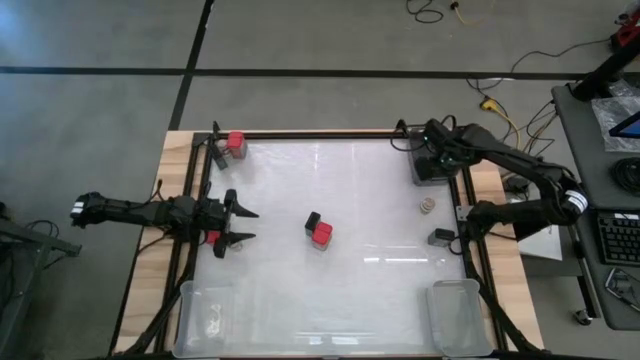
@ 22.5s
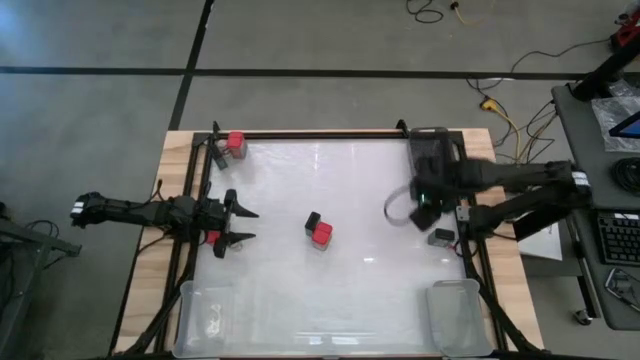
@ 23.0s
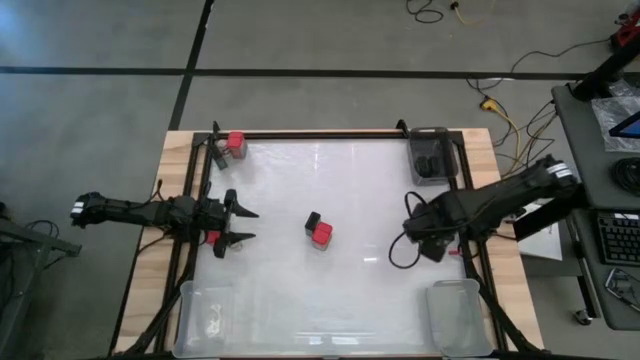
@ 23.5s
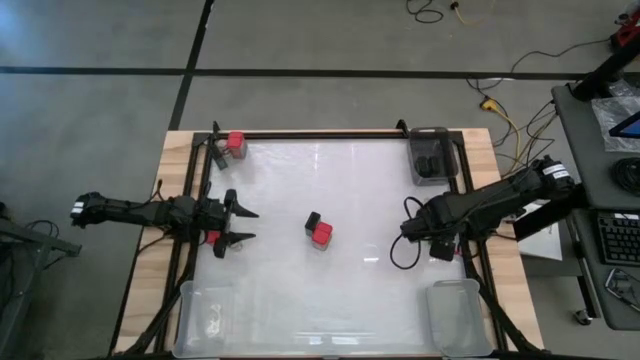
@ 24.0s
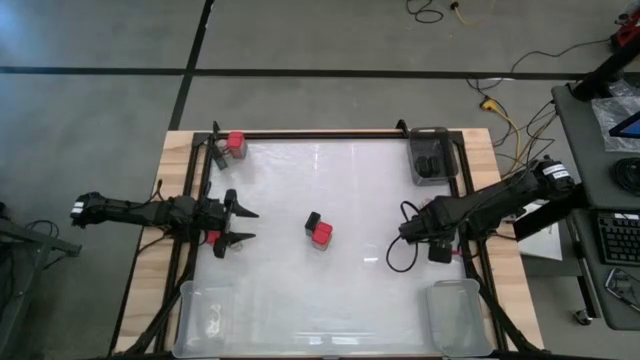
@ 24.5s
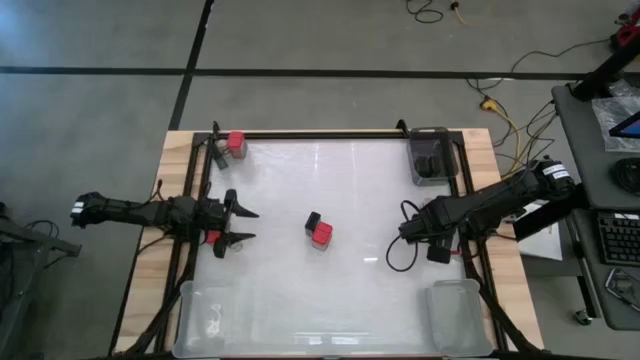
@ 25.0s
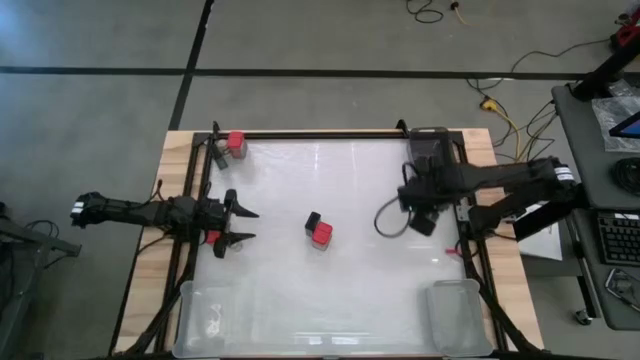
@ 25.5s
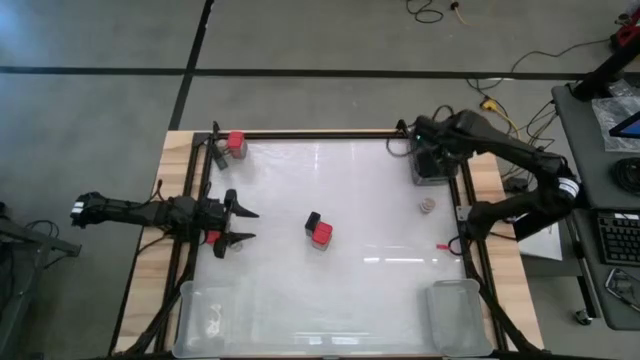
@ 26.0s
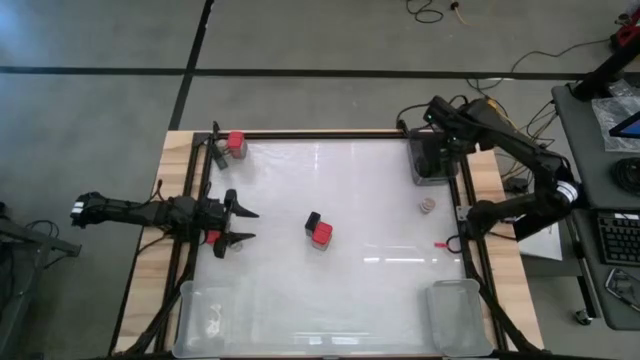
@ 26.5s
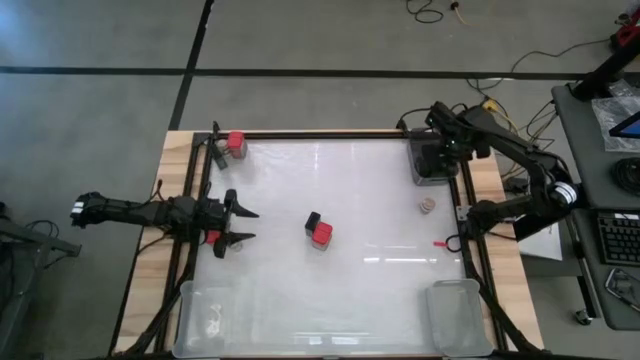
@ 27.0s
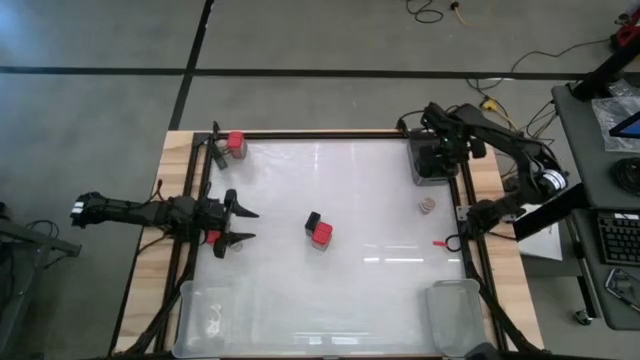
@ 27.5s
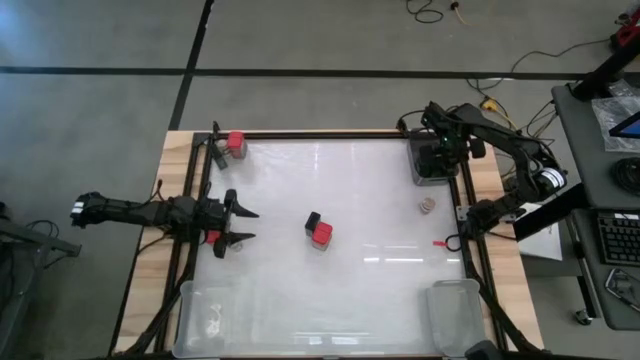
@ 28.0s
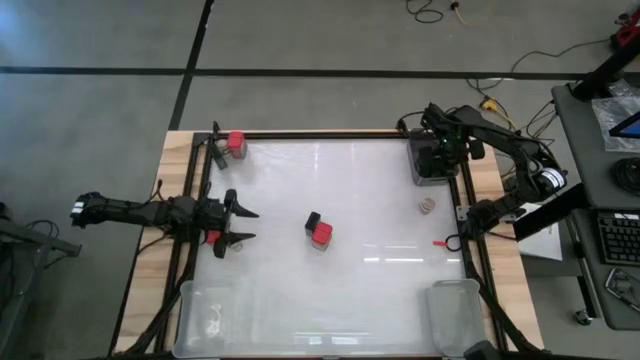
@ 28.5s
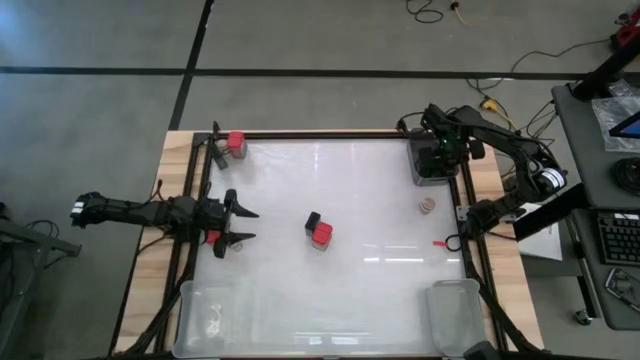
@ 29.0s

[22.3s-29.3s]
Task: Sort spices by type
Put the green seasoning can into the black bin

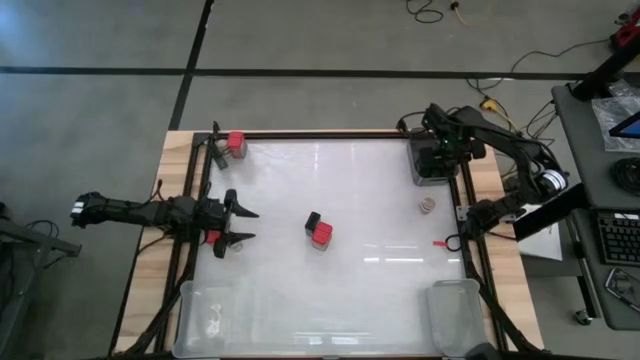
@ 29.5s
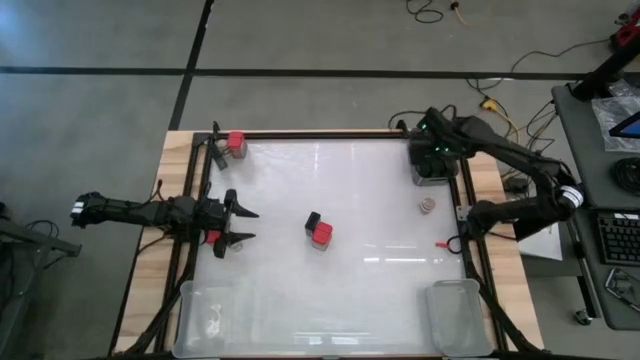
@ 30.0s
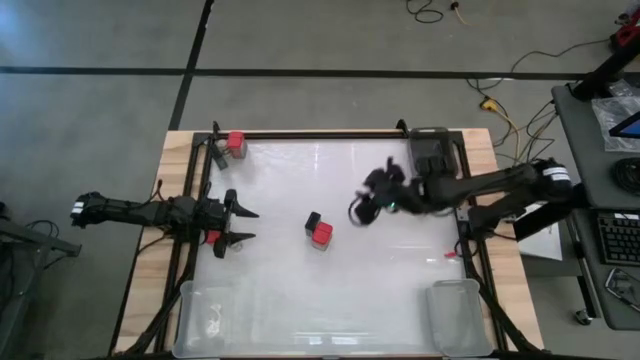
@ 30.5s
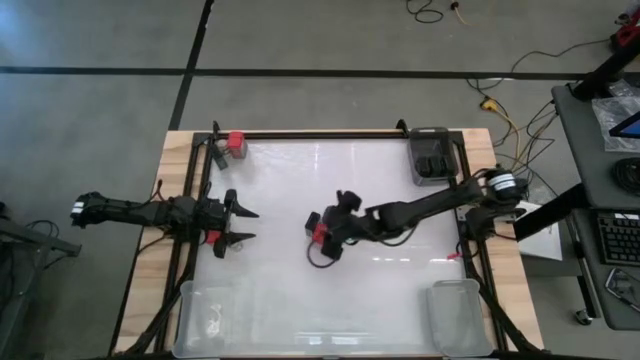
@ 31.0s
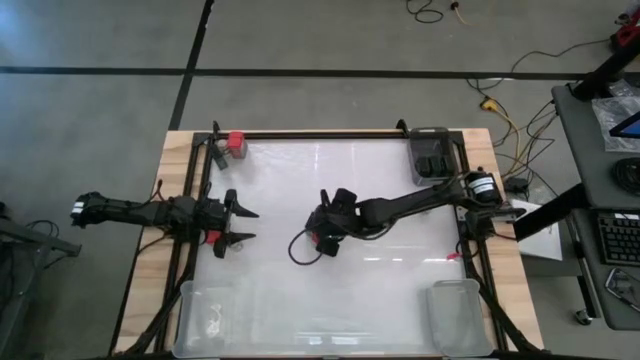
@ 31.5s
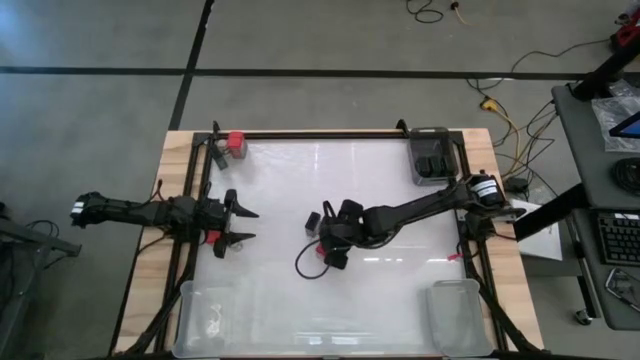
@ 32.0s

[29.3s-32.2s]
Adjust the red seasoning can

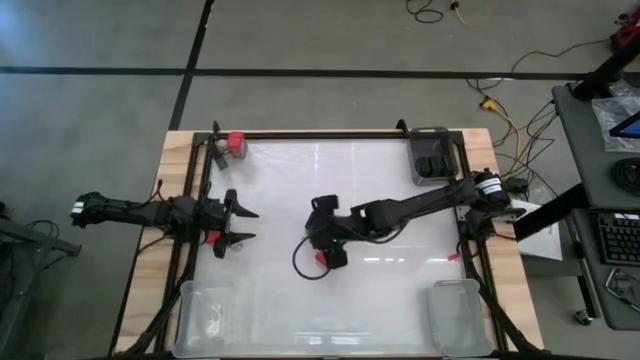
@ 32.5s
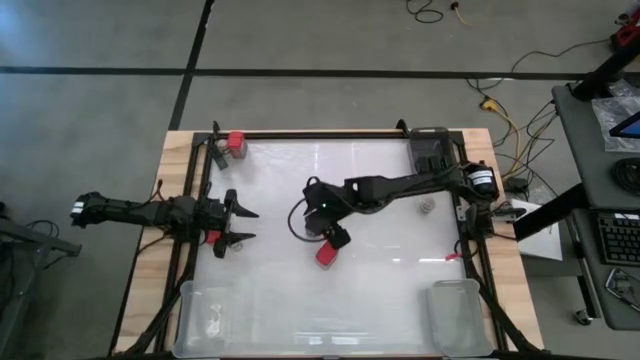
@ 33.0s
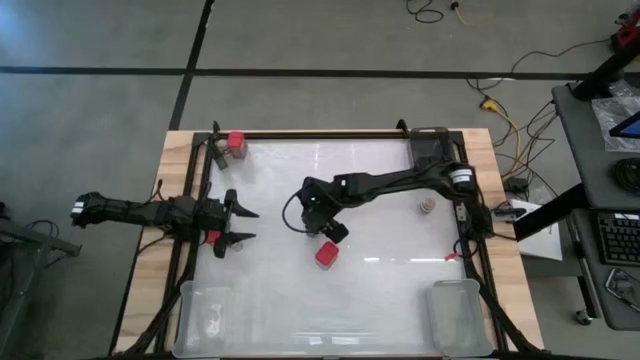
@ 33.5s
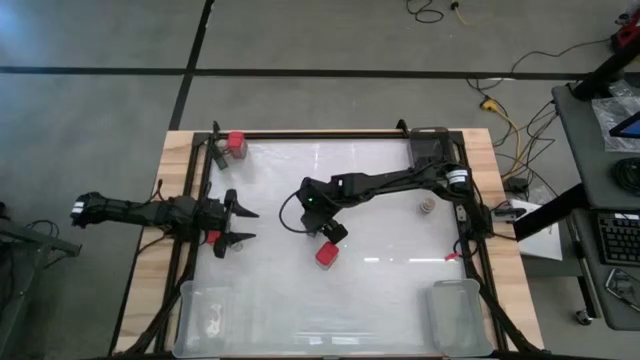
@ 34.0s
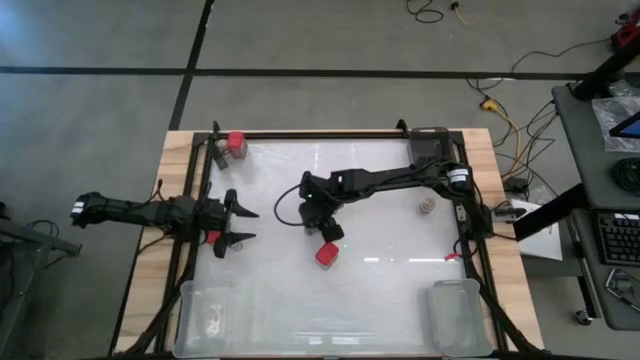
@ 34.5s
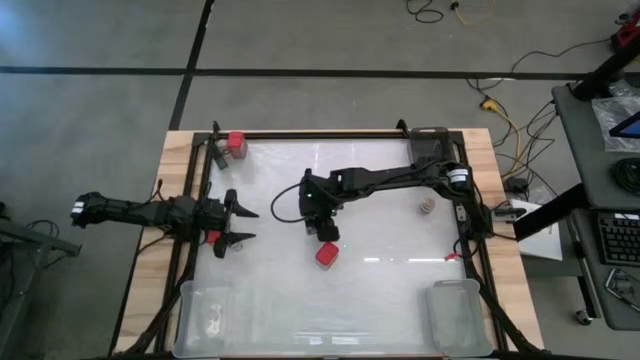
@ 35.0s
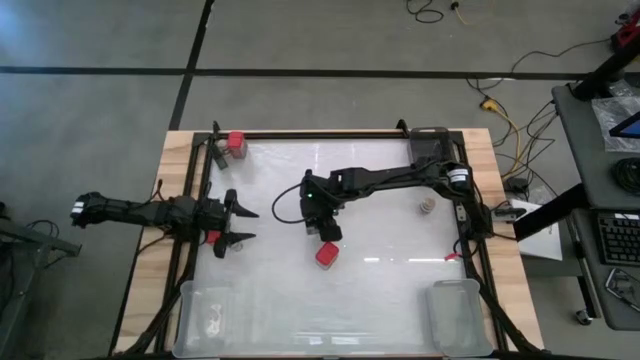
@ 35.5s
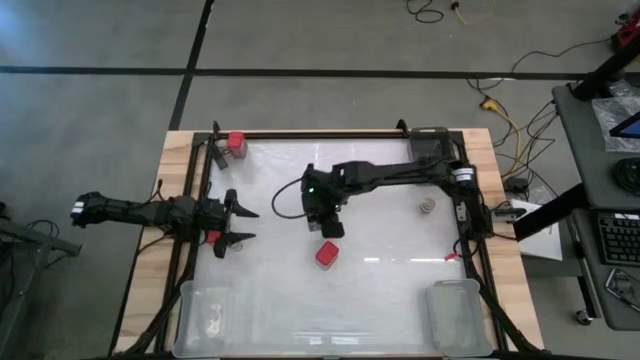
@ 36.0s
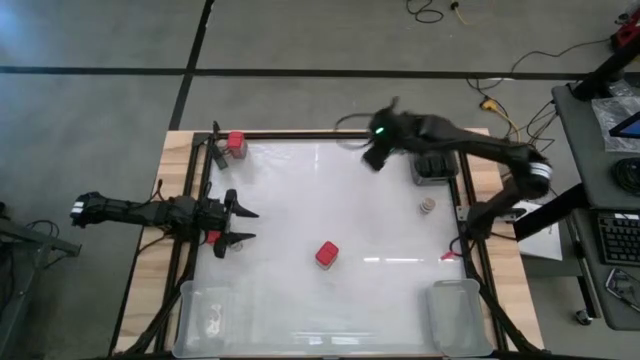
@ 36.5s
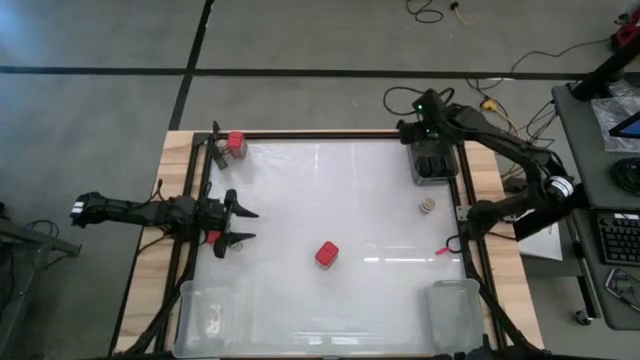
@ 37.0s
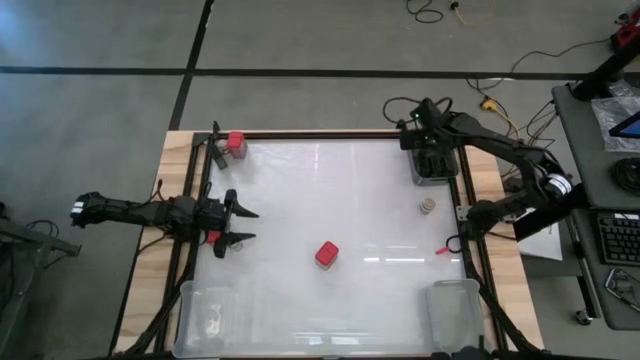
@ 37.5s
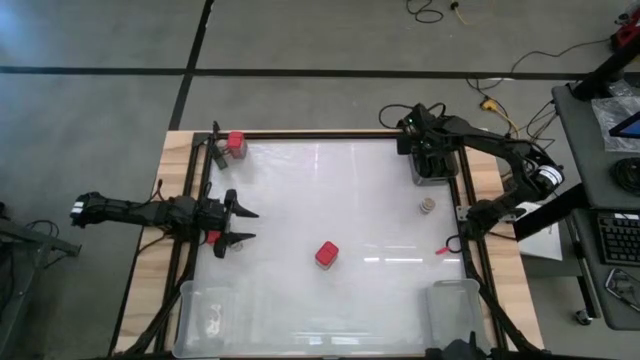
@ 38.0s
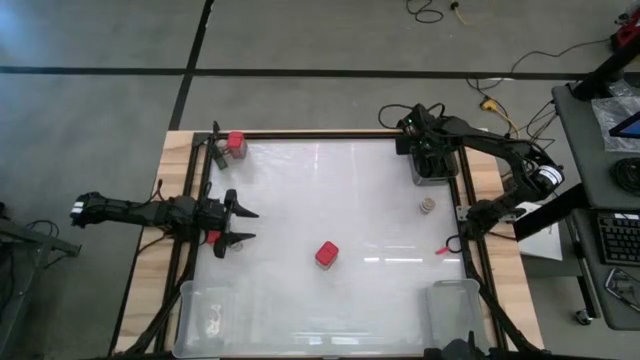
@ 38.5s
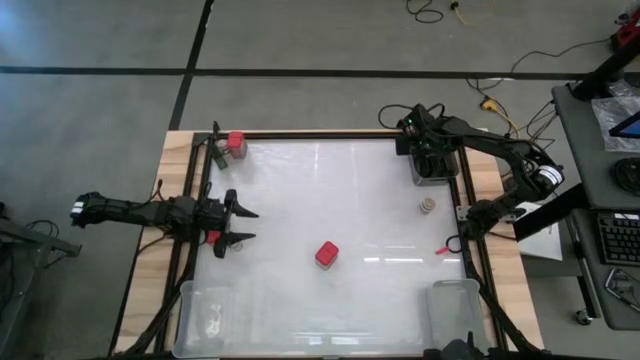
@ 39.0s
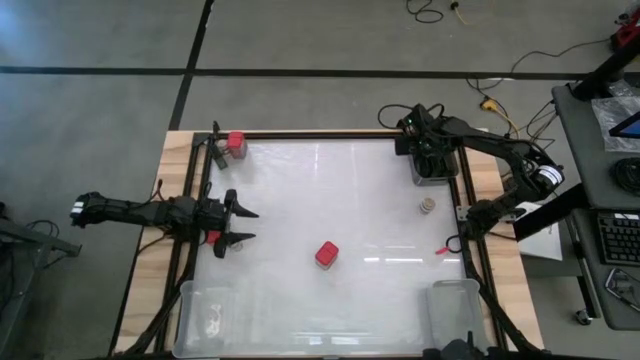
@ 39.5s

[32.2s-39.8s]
Put the green seasoning can into the black bin

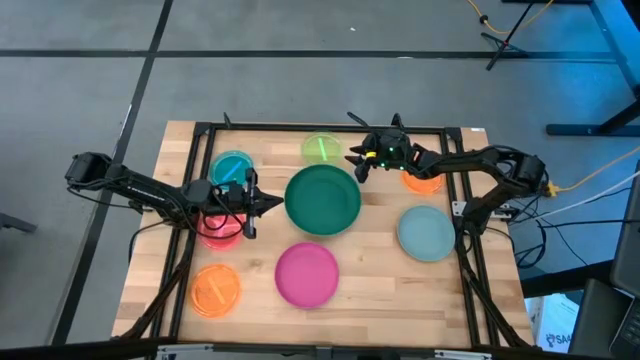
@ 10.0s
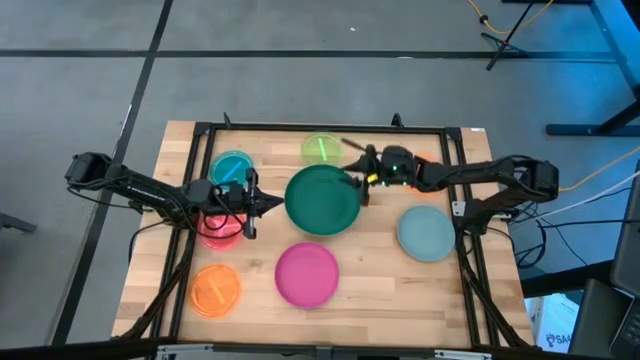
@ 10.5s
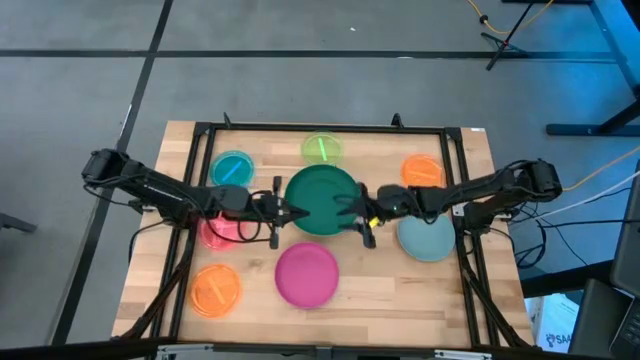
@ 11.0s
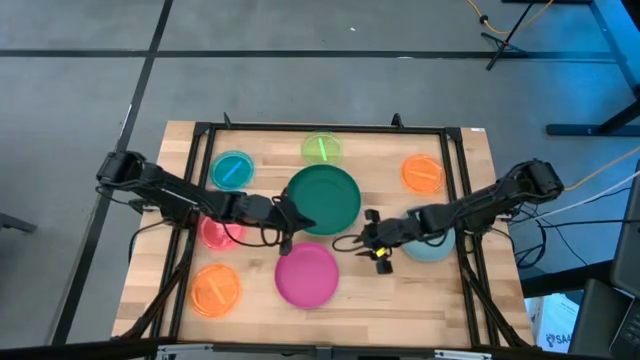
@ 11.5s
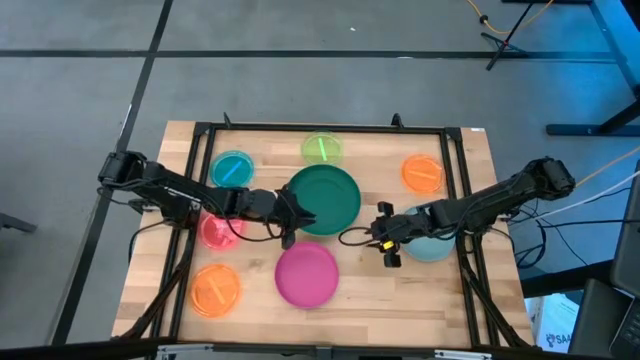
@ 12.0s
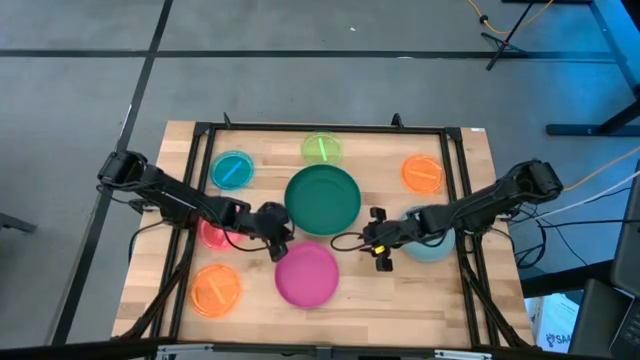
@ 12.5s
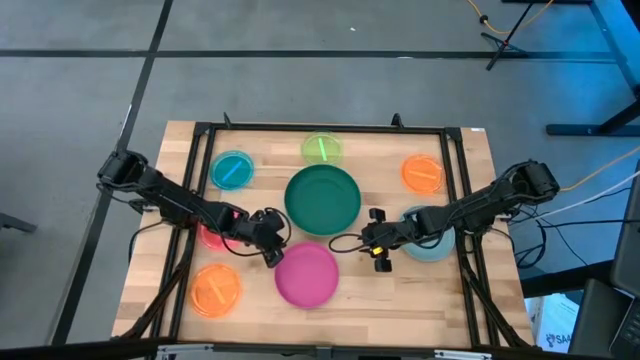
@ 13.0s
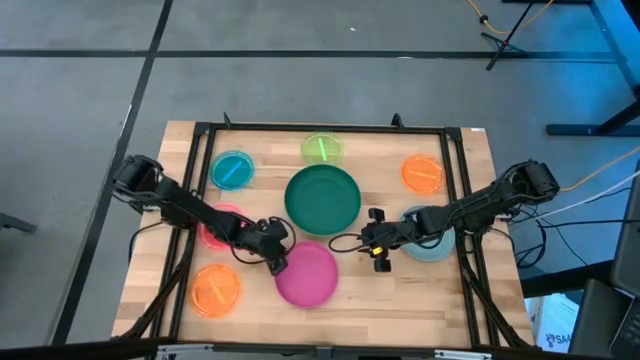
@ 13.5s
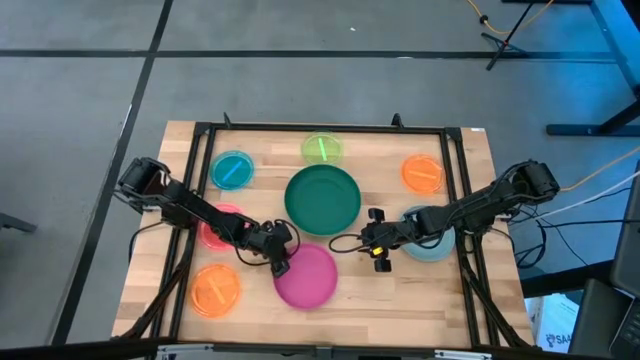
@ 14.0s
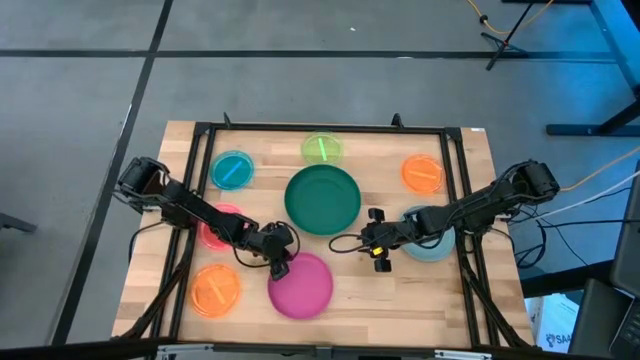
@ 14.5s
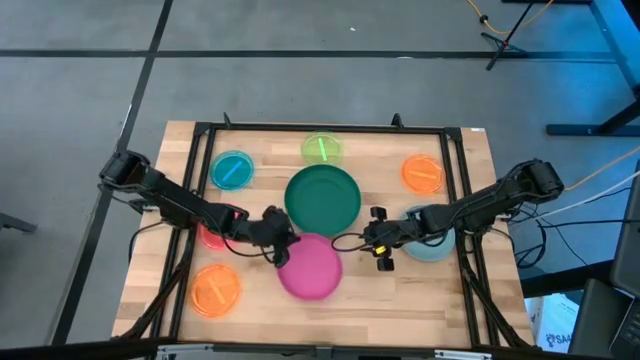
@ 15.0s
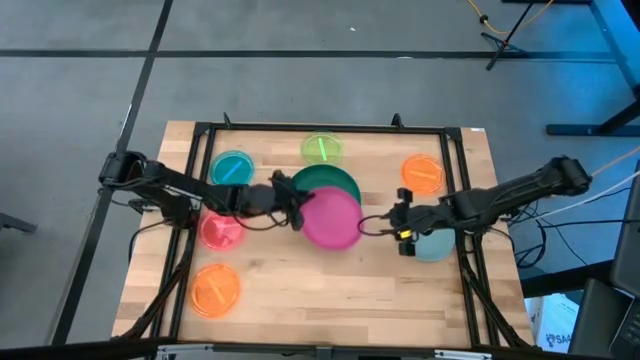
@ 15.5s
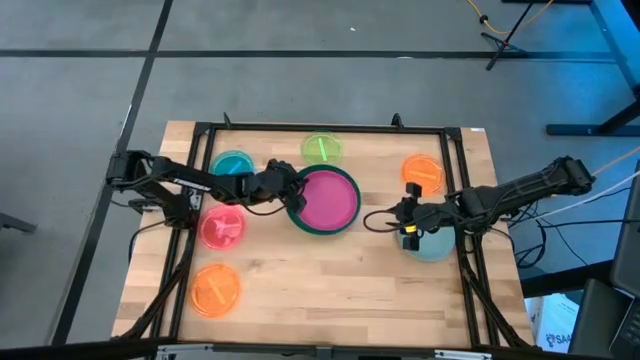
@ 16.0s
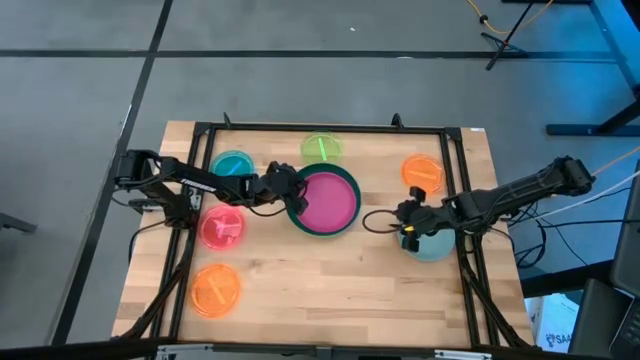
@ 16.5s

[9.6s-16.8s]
Task: Stack plastic plates
Stack the pink plate on top of the dark green plate
